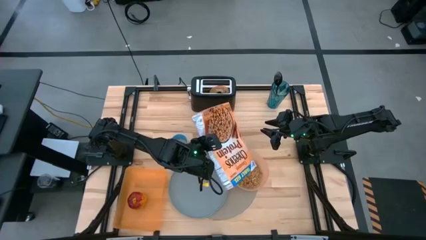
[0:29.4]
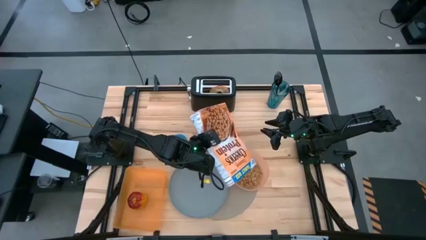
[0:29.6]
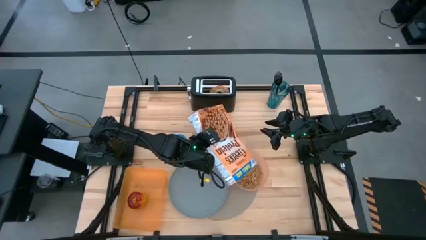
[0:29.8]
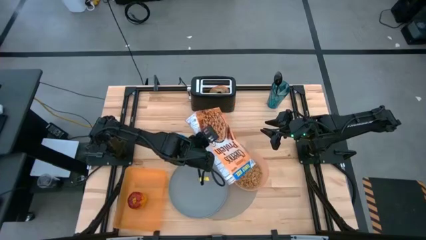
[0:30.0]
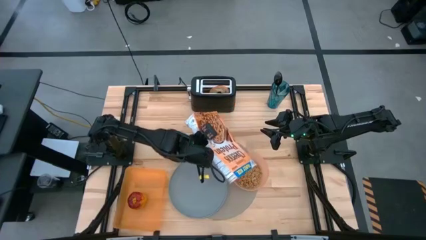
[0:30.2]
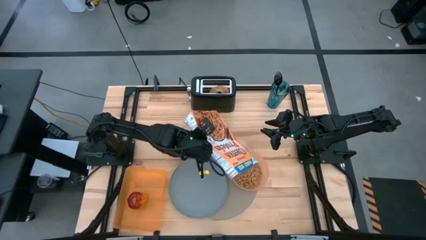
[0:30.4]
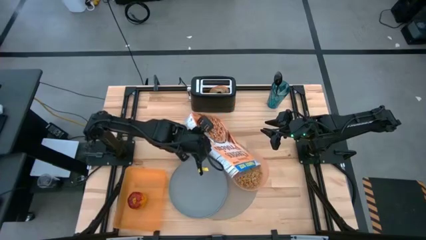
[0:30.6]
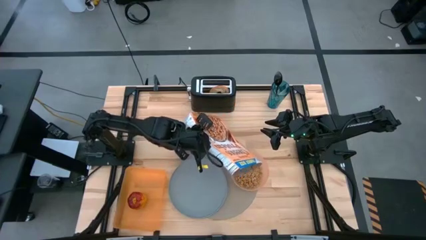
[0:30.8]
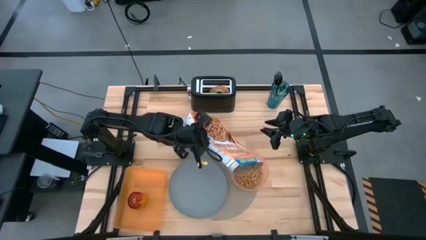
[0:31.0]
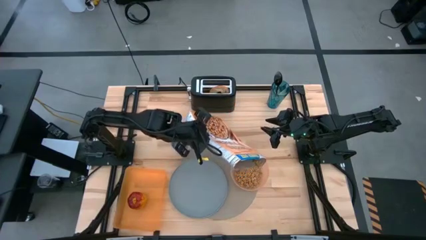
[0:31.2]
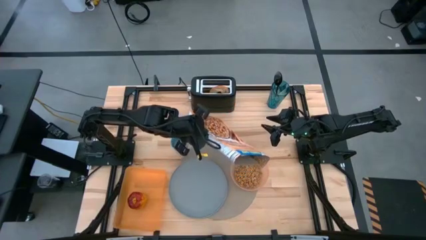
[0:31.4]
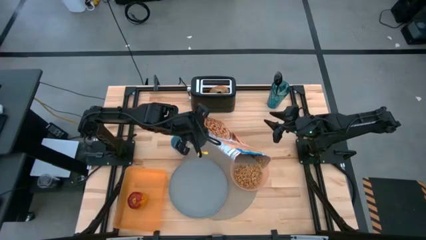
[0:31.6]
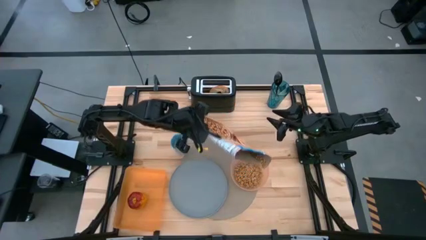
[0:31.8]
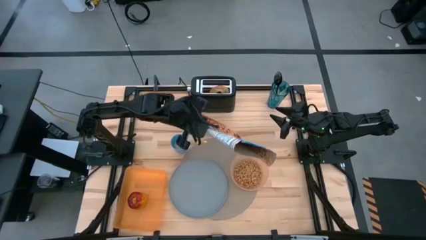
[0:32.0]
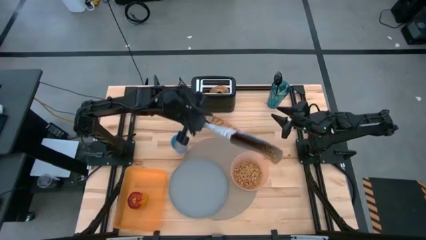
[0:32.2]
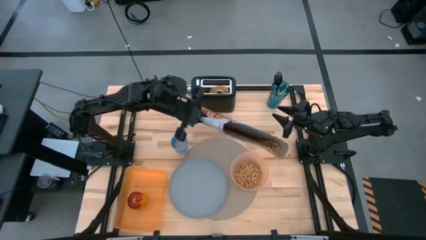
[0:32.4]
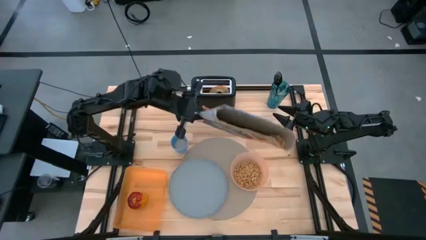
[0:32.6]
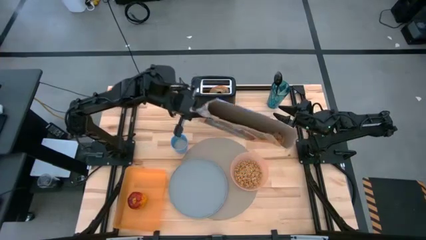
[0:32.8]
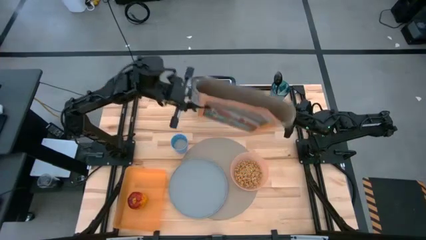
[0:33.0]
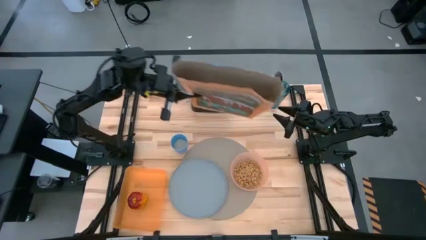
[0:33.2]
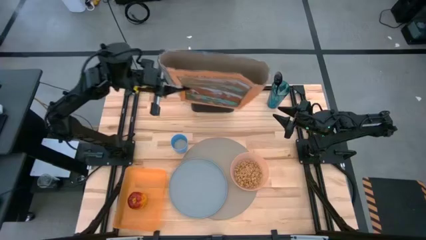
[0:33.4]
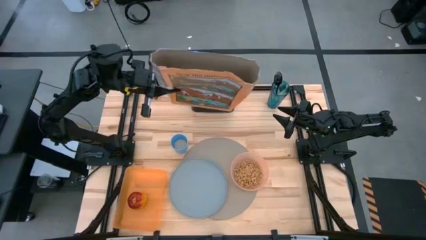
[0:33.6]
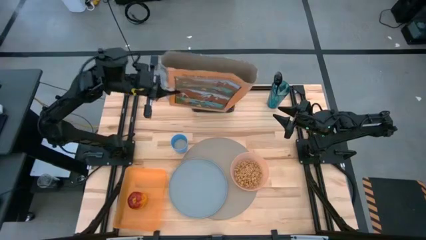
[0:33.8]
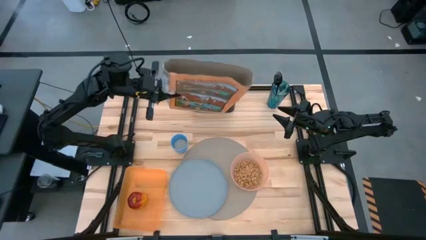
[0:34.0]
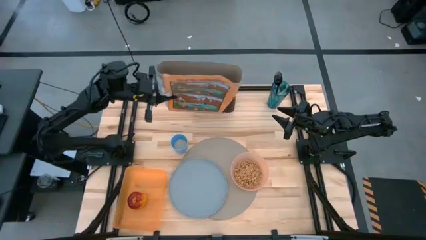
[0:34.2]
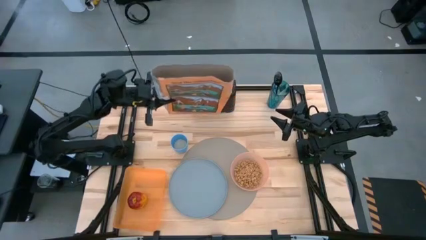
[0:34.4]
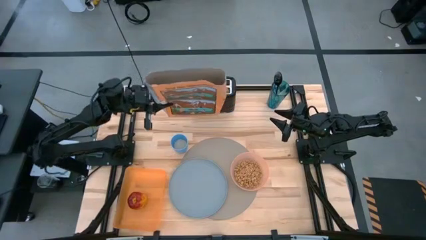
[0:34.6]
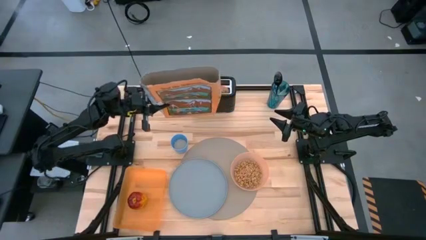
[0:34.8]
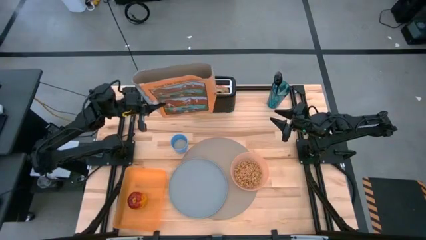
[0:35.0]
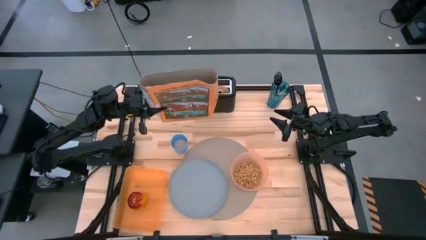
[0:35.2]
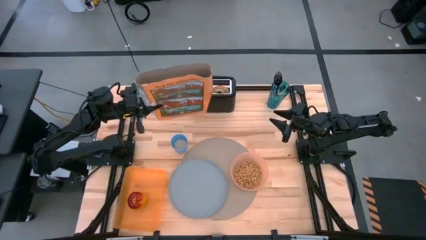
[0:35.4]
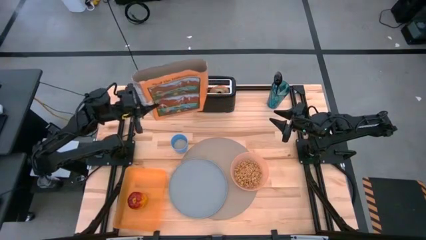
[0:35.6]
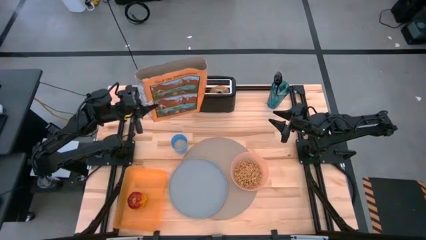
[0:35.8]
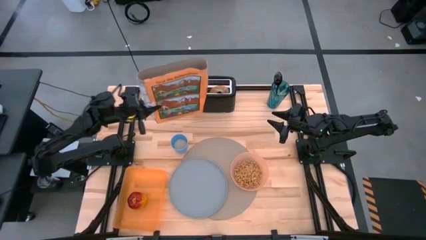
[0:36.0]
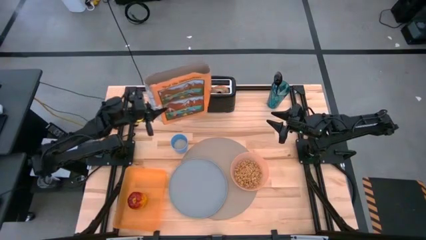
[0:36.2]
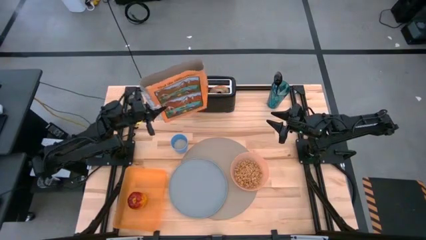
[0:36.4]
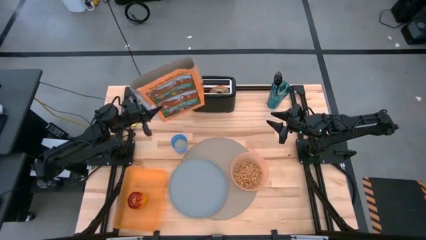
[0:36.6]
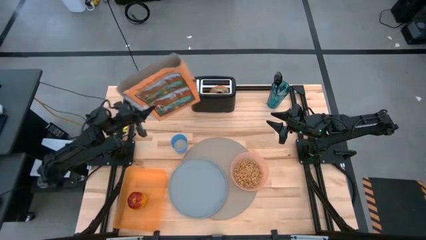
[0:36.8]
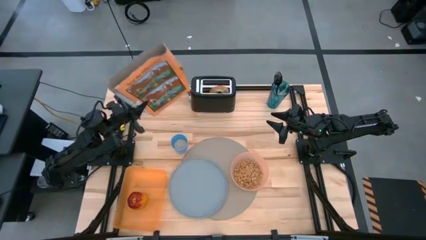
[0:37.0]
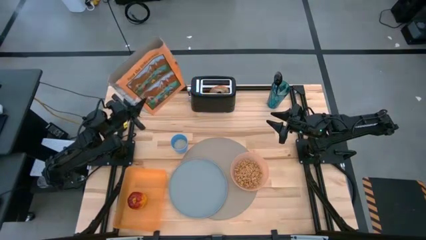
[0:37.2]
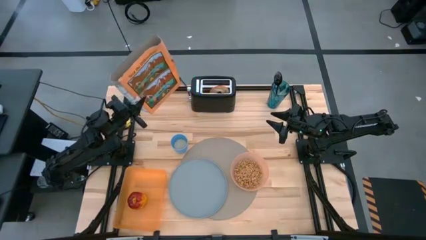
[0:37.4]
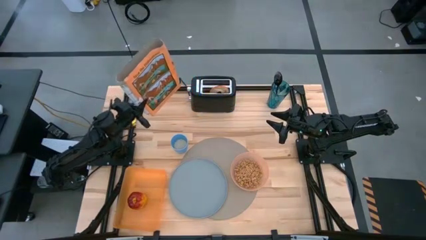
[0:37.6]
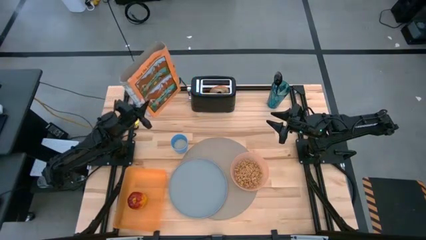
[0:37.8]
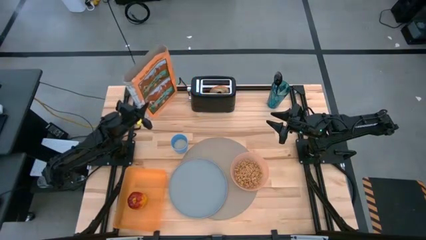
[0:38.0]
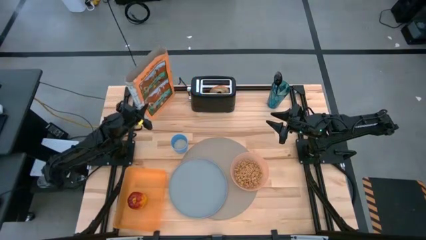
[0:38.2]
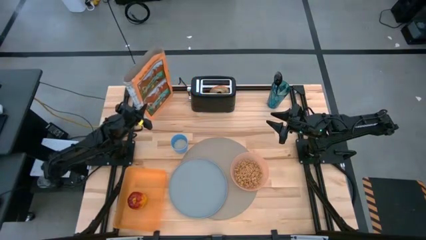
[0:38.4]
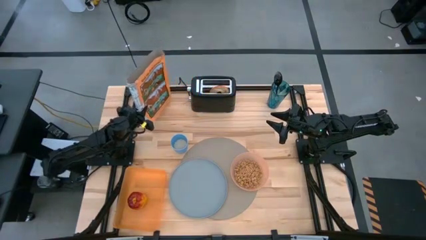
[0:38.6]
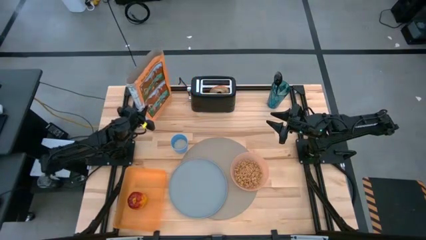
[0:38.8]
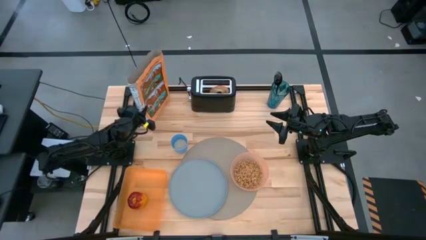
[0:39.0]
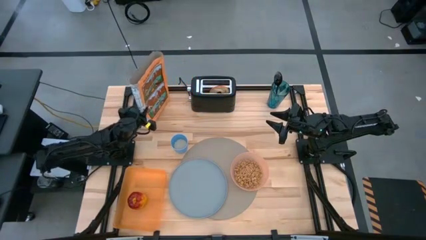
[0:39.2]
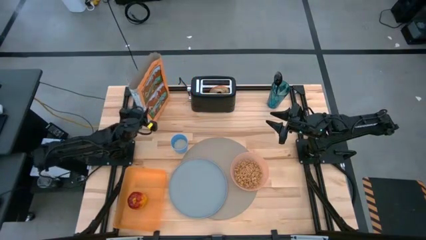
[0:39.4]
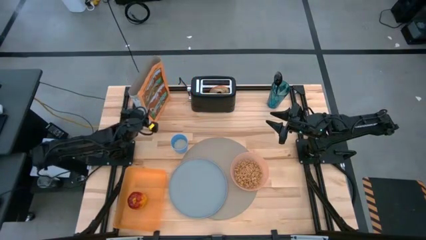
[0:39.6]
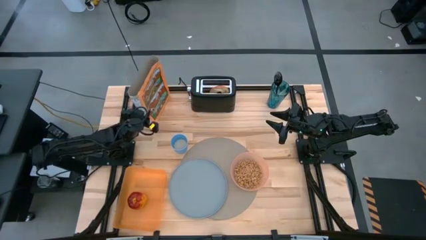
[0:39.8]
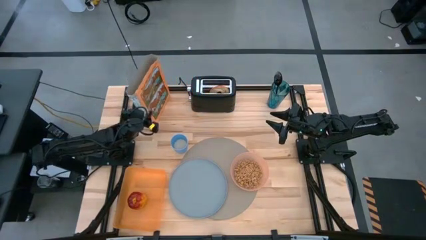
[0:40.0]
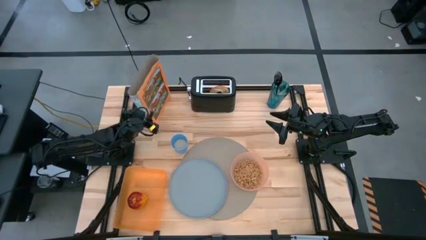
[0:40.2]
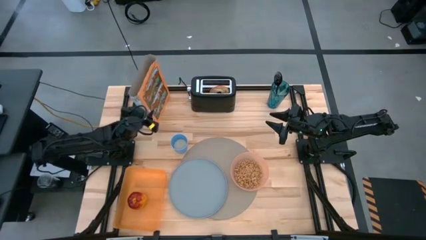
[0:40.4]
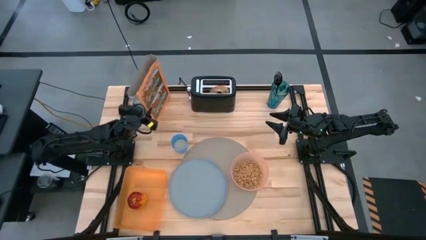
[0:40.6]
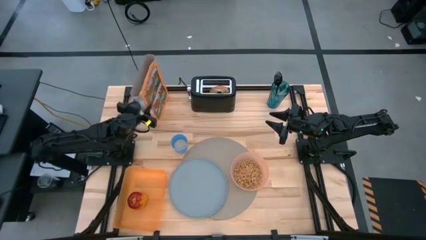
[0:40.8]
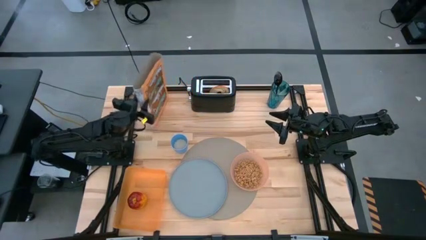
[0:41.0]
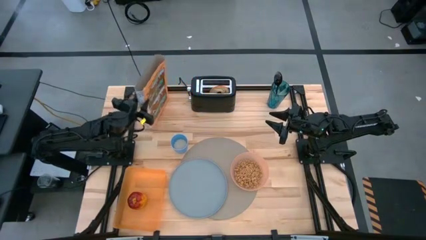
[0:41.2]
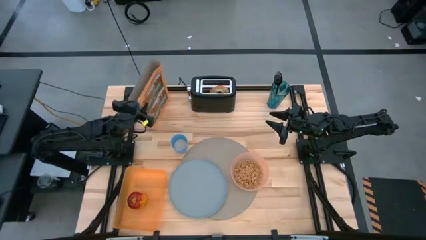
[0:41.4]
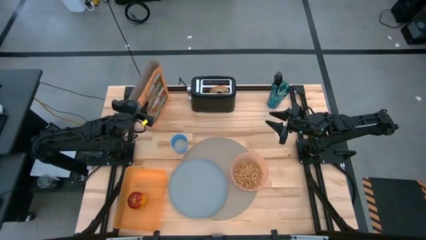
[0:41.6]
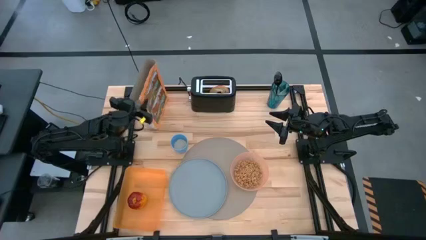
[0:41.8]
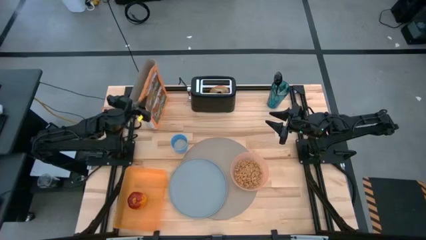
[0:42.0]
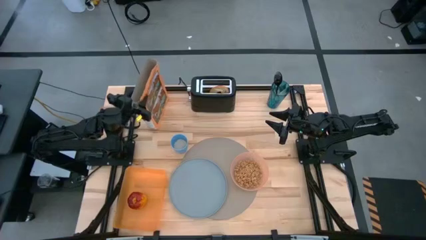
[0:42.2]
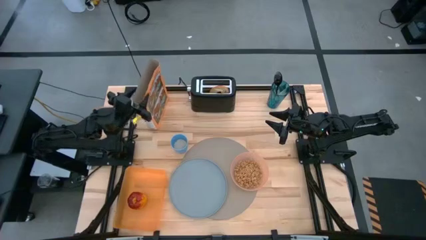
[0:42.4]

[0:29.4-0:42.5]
Task: Arrange a breakfast setting
Pour the cereal from the cereal box into the light orange bowl
